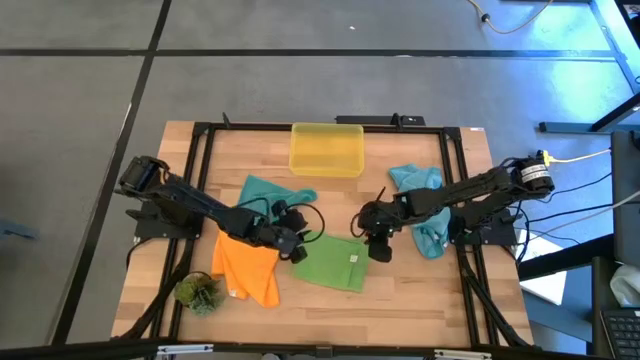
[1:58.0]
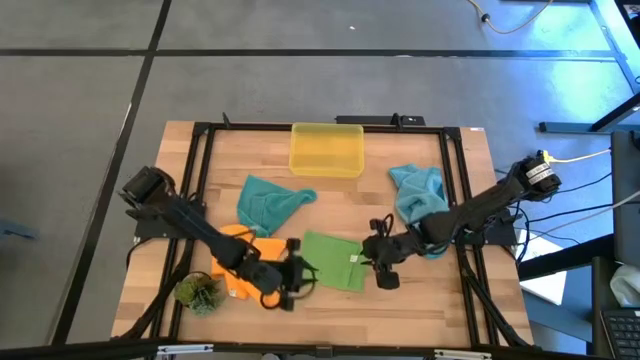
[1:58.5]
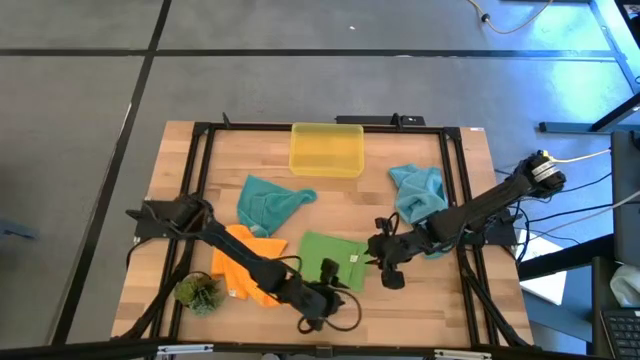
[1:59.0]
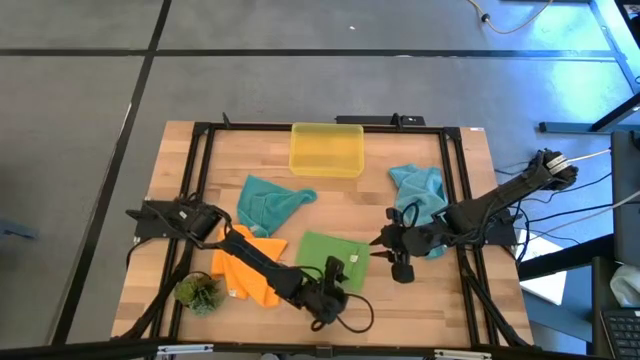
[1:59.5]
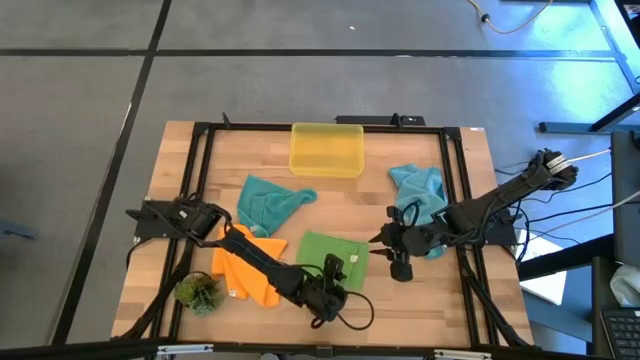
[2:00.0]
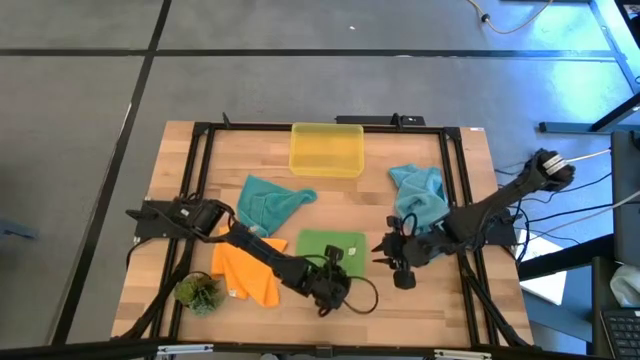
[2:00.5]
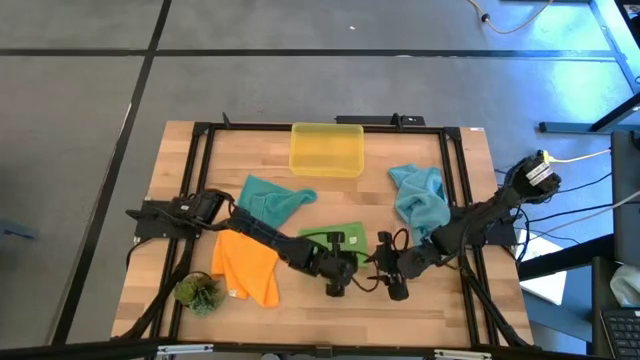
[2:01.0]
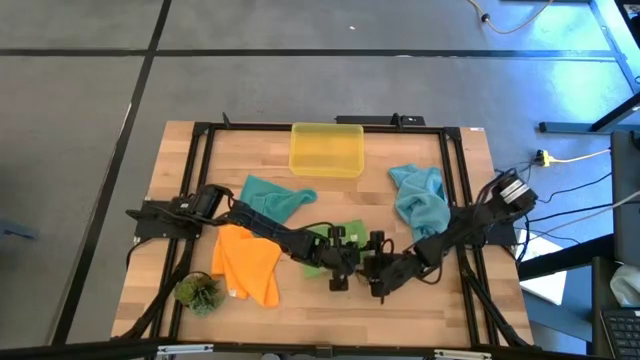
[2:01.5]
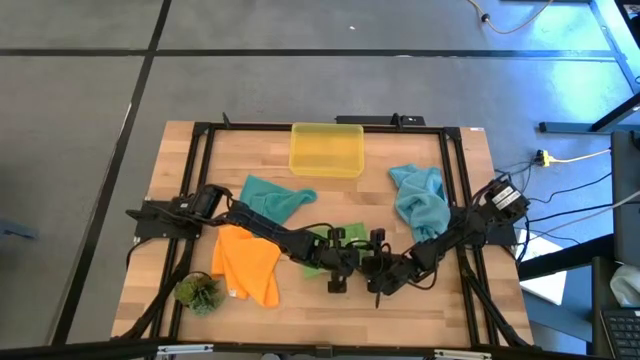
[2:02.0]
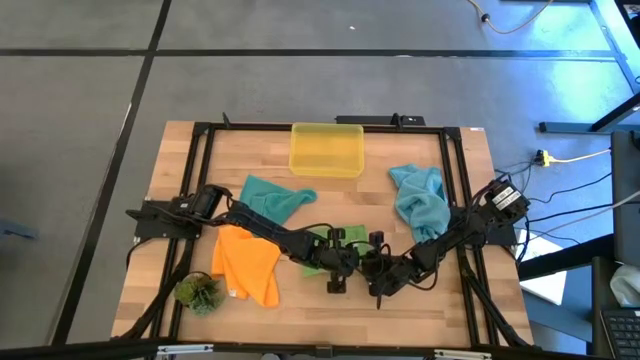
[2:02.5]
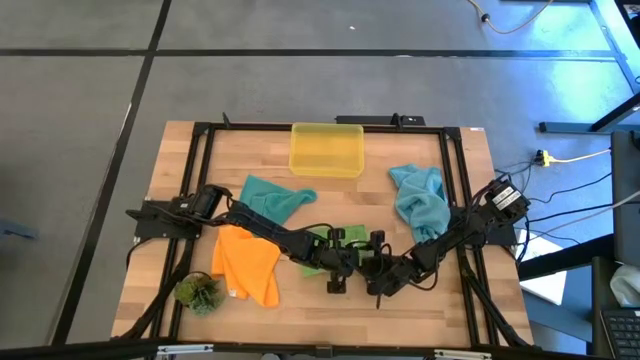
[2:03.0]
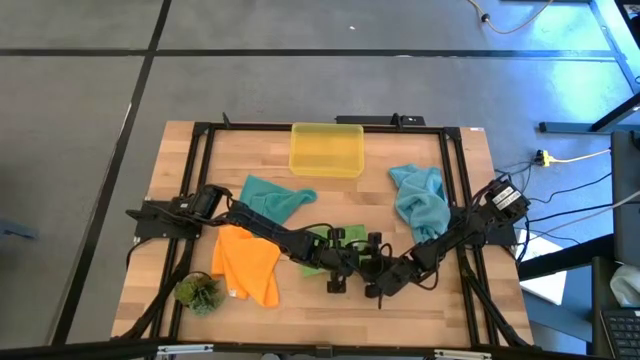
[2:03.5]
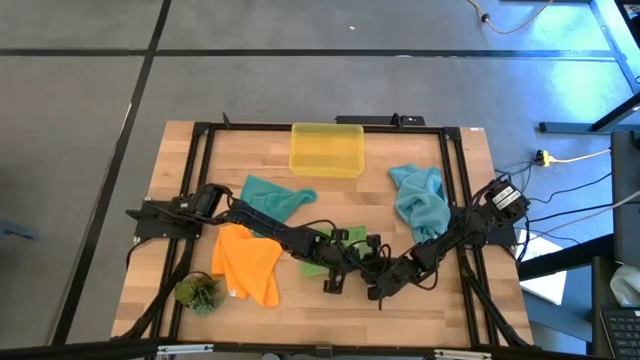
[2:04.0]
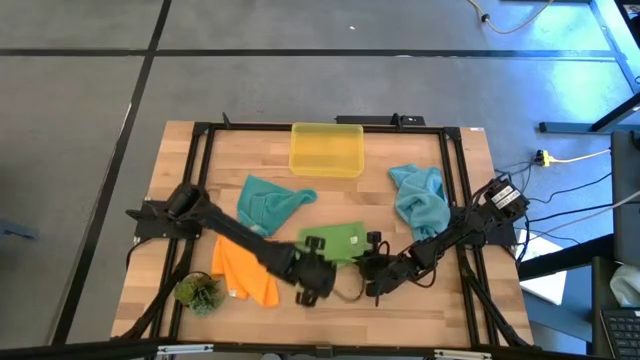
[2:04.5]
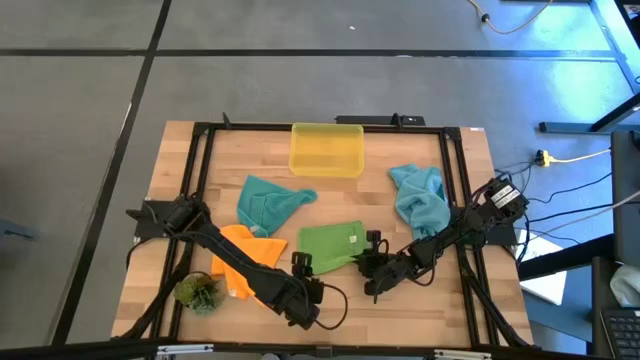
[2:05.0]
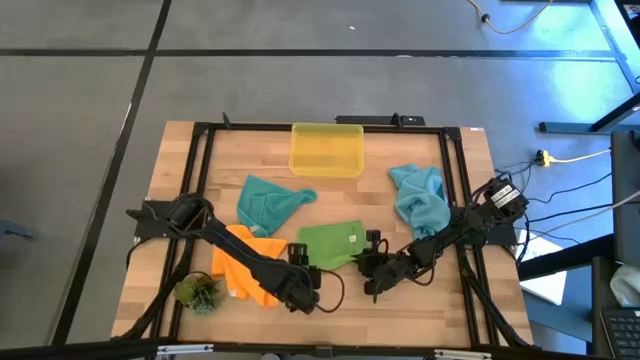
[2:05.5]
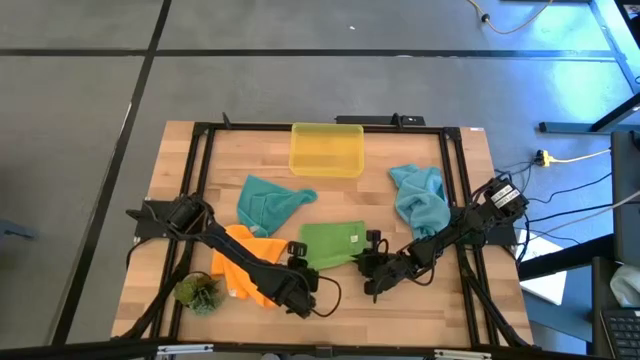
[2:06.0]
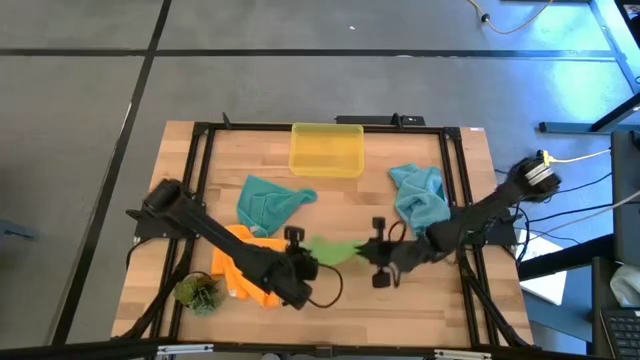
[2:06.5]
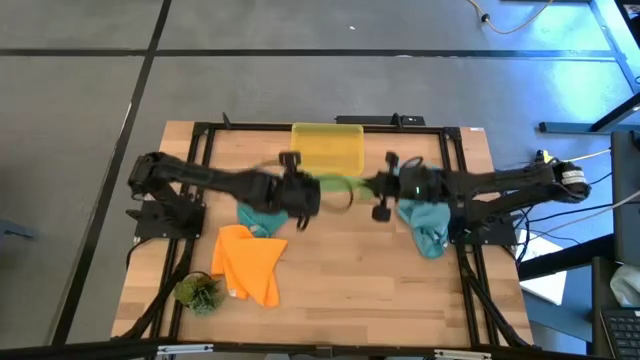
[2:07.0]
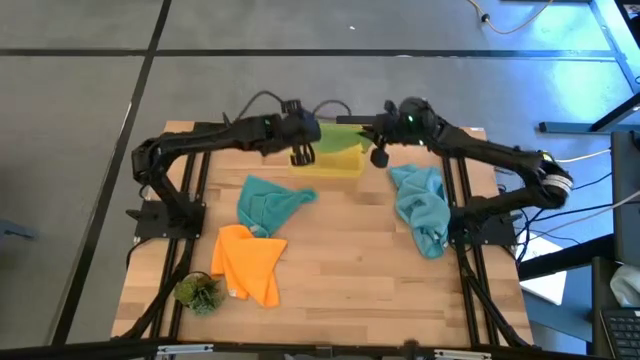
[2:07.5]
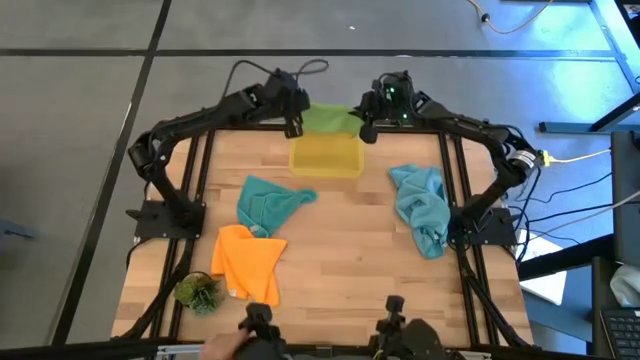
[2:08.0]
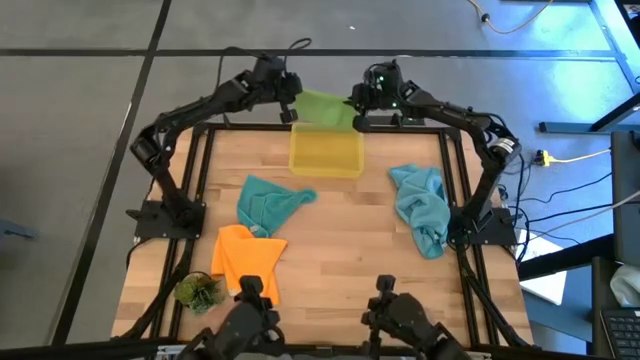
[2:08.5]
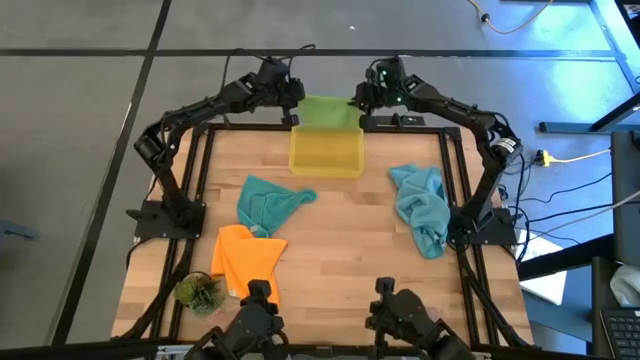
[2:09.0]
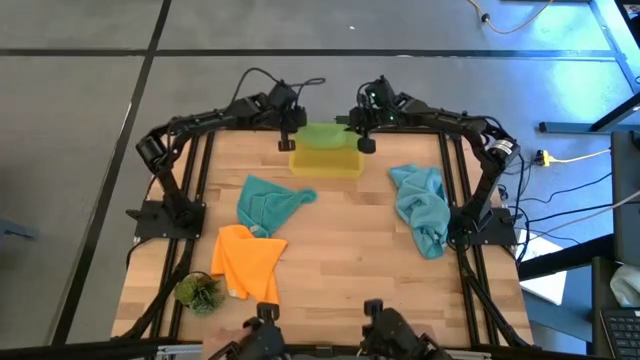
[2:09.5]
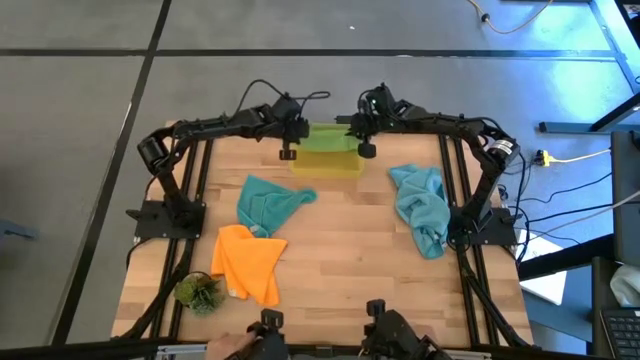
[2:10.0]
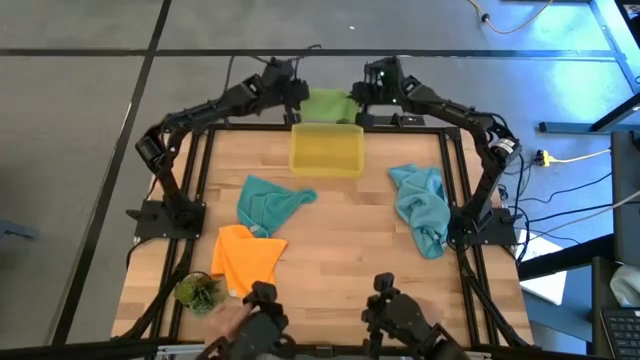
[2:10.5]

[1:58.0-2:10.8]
Task: Fold microfiber towels
Put the green microfiber cloth into the yellow bin

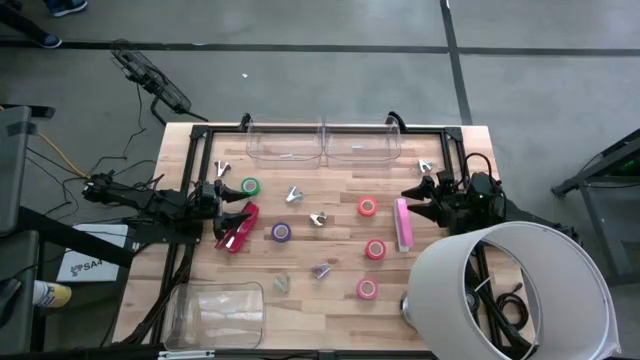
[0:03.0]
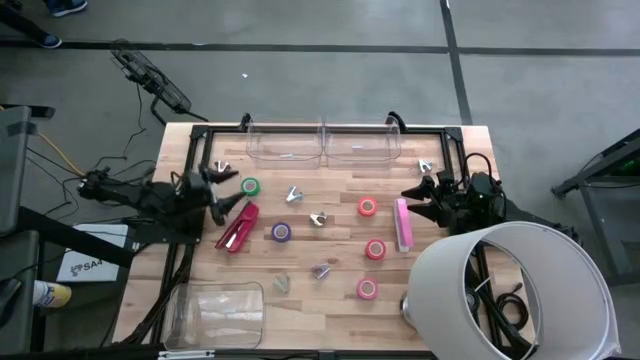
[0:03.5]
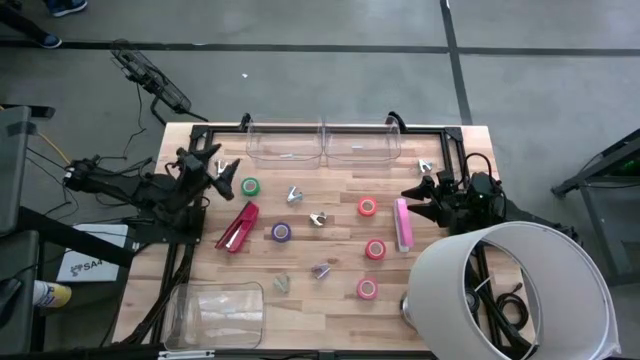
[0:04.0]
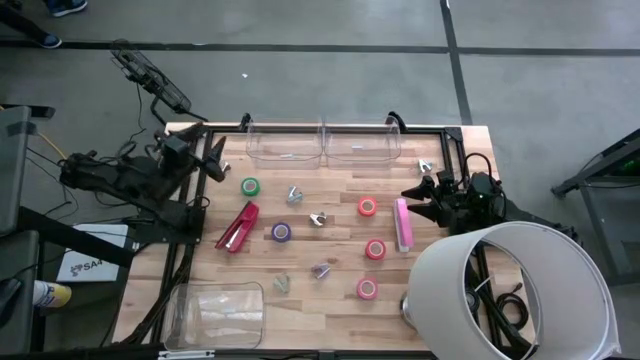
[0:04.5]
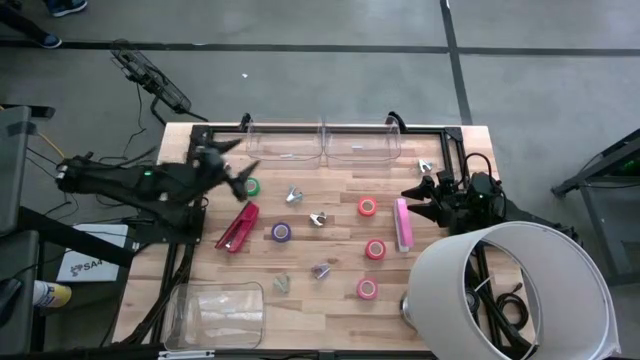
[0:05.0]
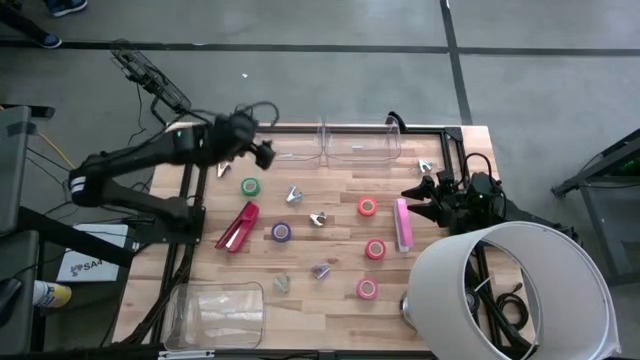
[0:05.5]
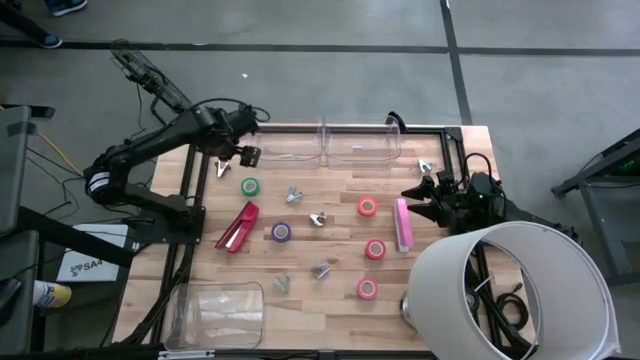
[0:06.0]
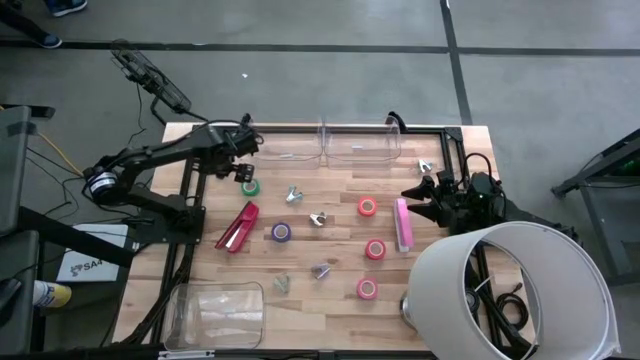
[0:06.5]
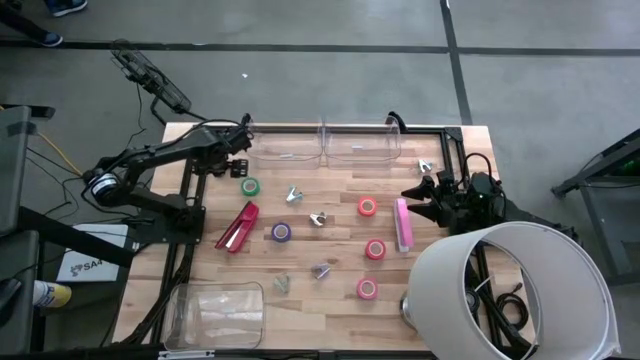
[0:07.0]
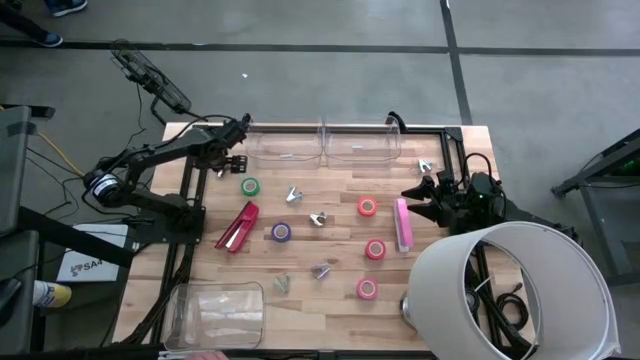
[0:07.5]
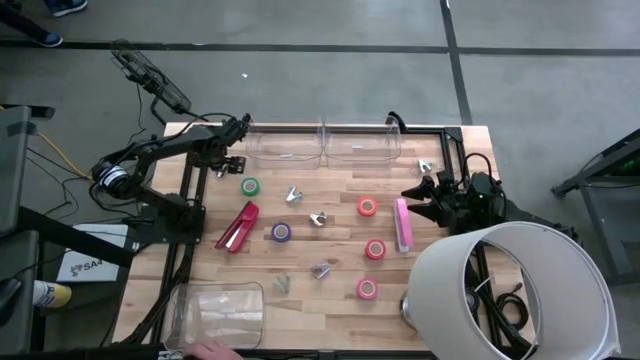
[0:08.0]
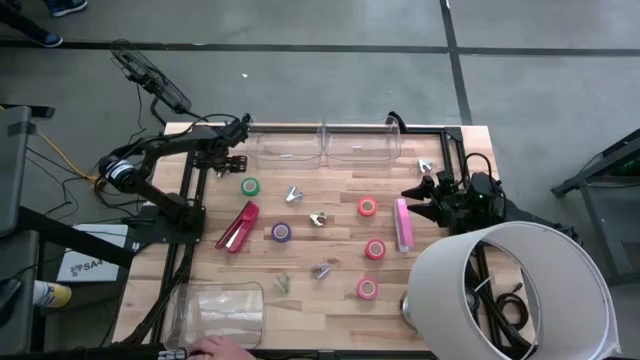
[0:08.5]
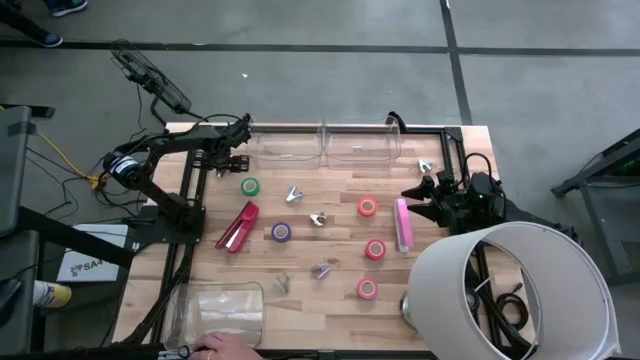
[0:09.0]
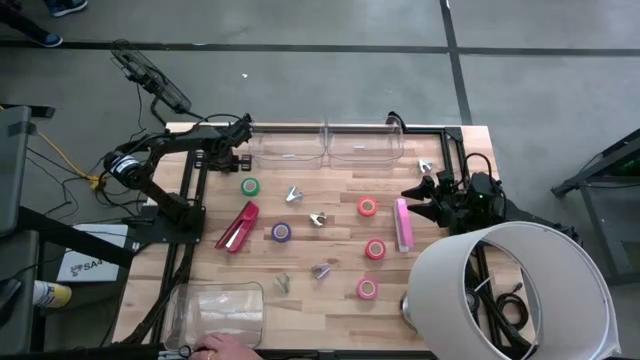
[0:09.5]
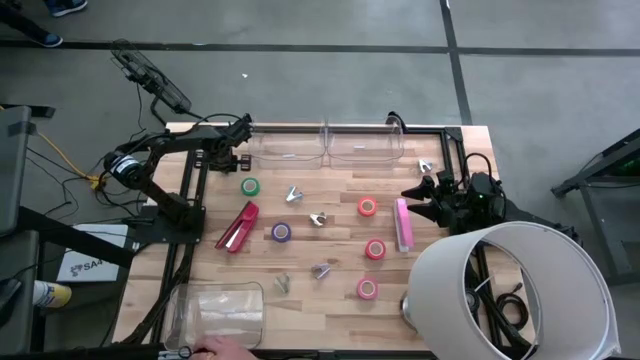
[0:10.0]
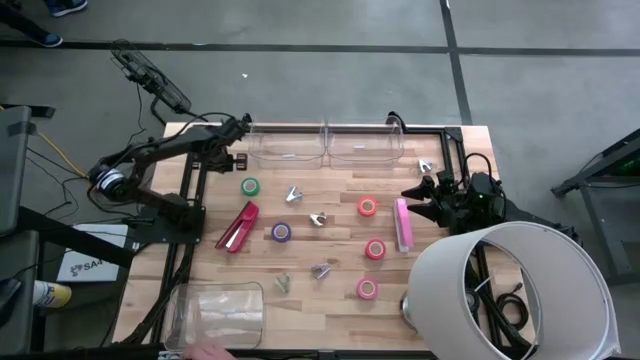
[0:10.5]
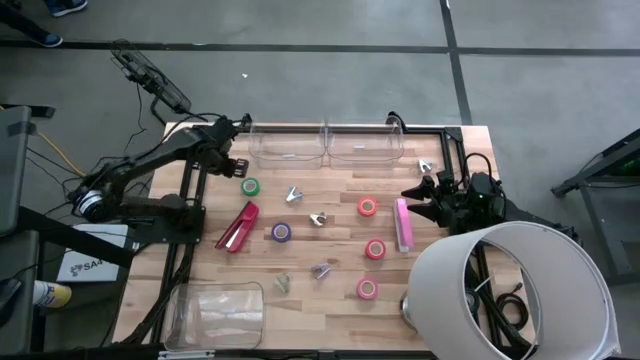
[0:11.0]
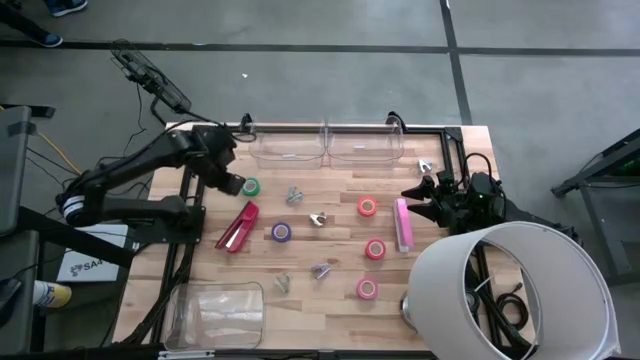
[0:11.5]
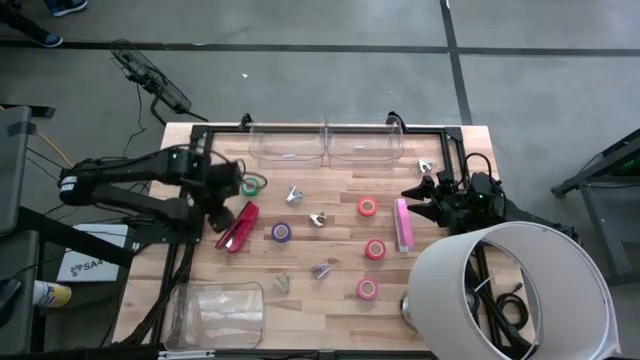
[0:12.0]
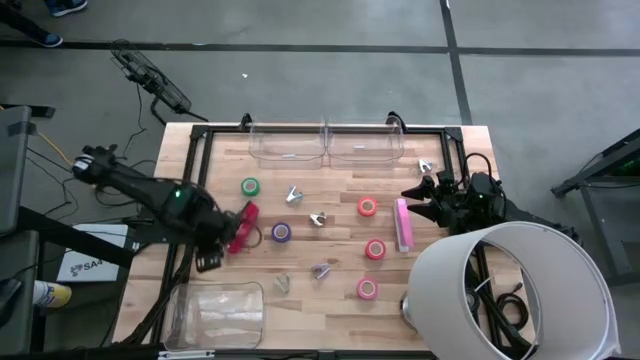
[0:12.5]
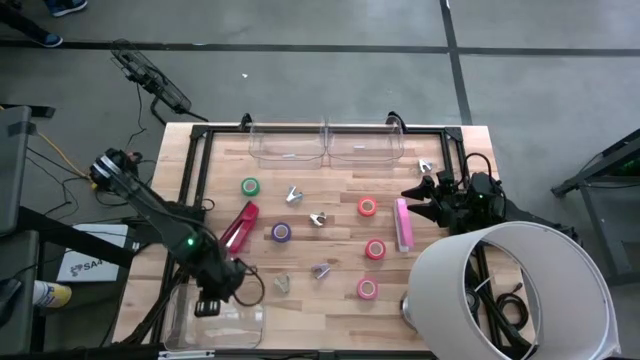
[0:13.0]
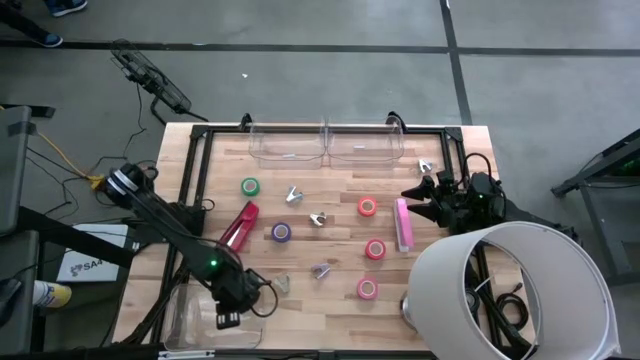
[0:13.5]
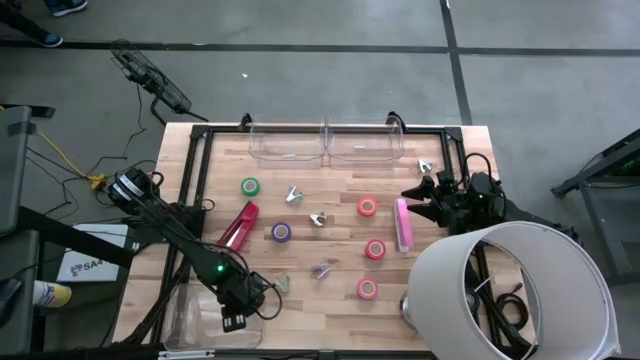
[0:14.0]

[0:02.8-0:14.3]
Task: Pick and place Stapler, Stapler remover, tape
Put the black stapler remover into the bottom transparent bin
